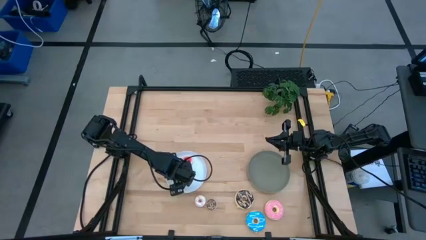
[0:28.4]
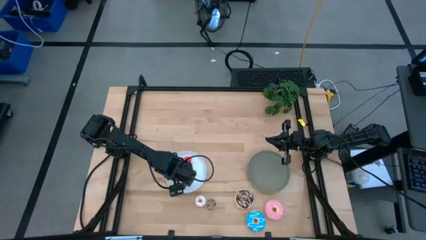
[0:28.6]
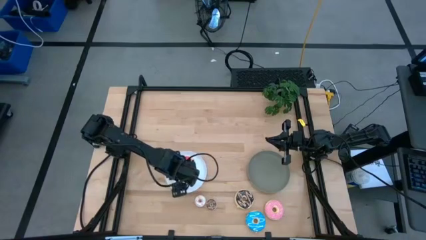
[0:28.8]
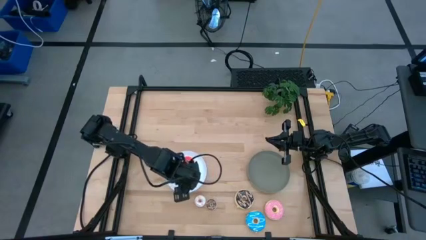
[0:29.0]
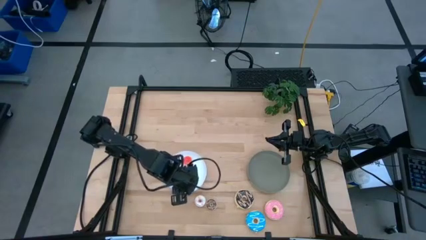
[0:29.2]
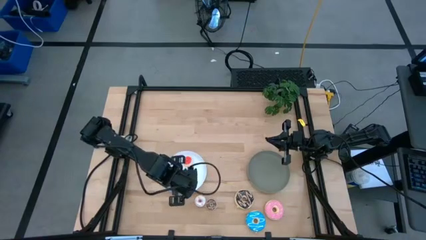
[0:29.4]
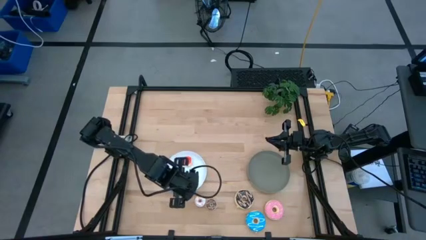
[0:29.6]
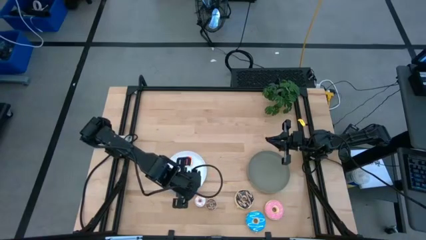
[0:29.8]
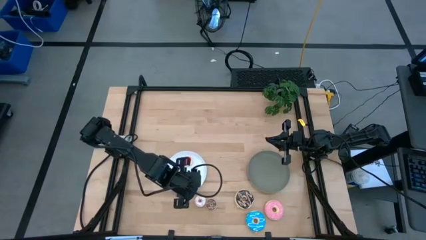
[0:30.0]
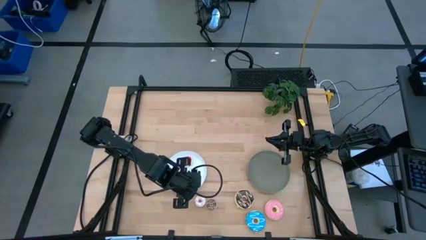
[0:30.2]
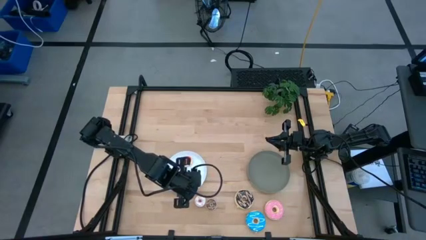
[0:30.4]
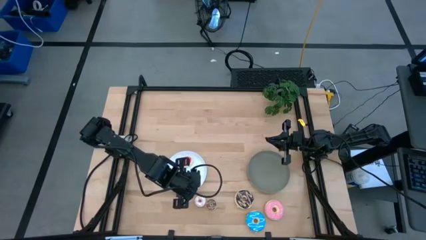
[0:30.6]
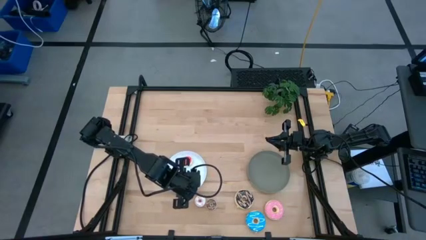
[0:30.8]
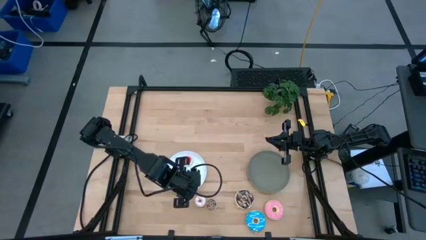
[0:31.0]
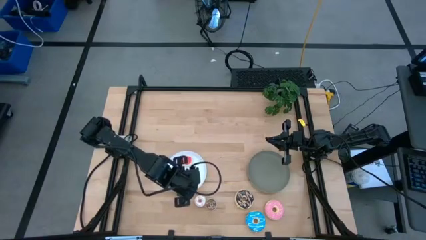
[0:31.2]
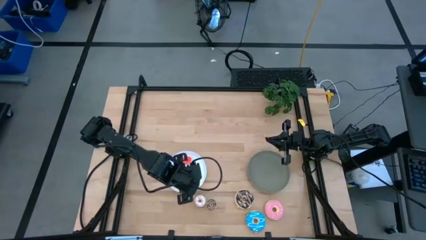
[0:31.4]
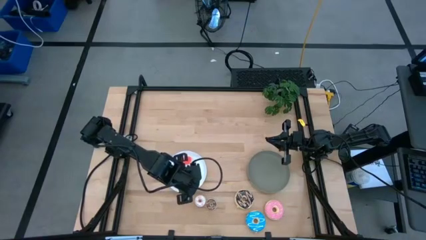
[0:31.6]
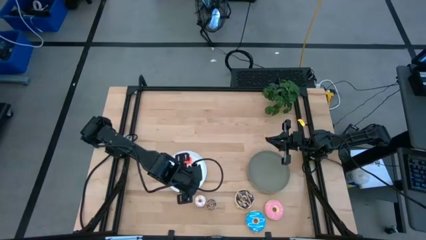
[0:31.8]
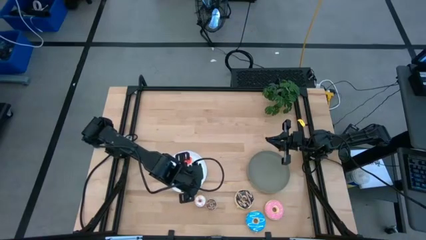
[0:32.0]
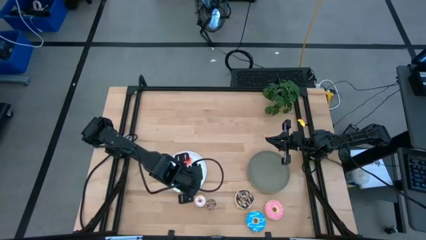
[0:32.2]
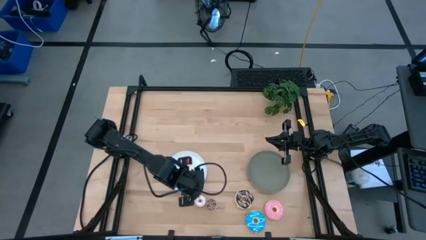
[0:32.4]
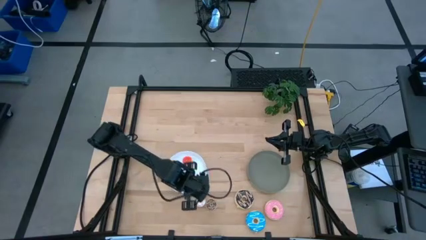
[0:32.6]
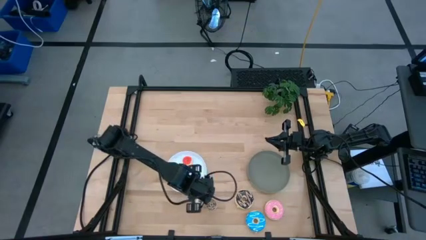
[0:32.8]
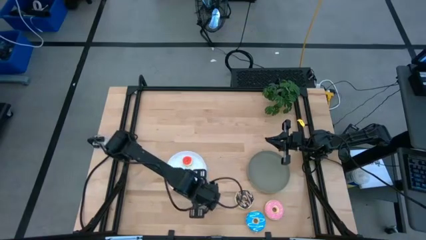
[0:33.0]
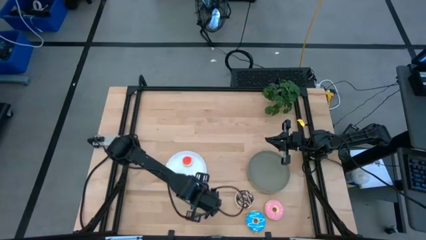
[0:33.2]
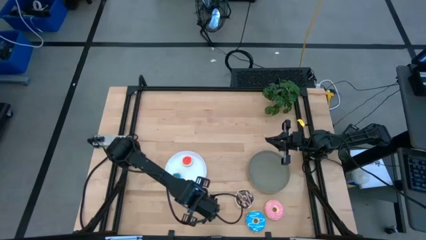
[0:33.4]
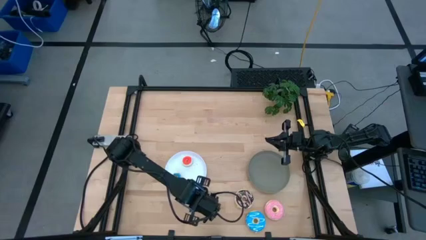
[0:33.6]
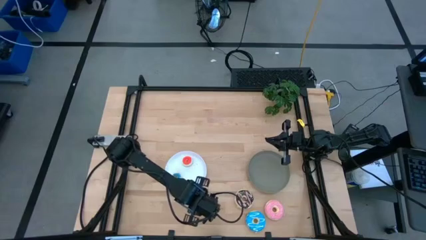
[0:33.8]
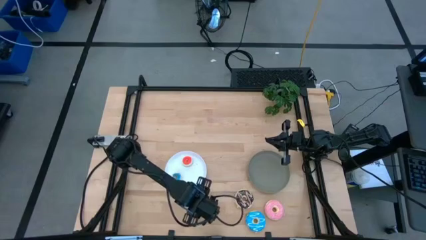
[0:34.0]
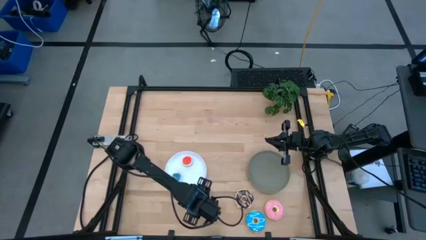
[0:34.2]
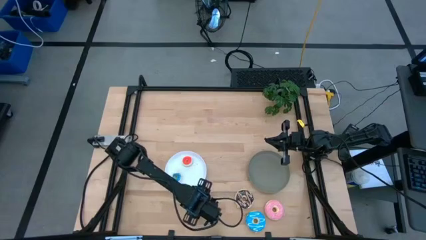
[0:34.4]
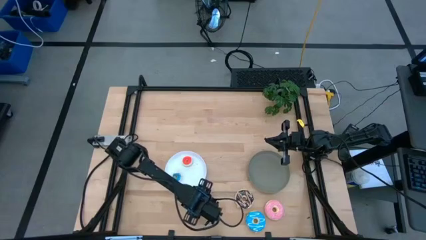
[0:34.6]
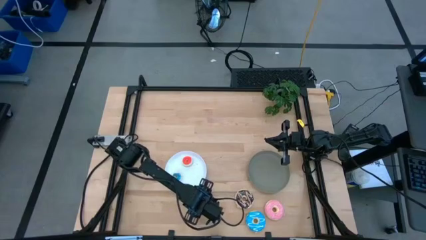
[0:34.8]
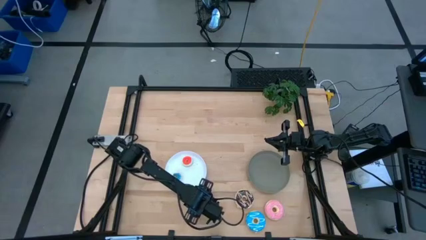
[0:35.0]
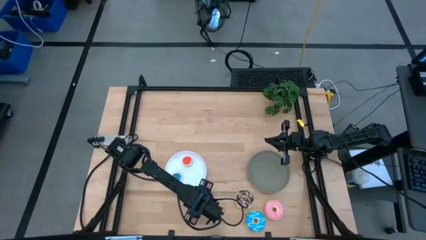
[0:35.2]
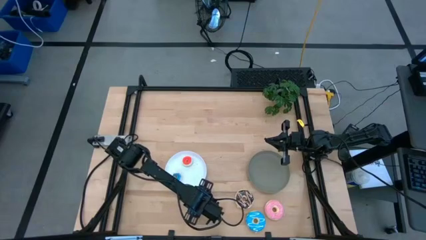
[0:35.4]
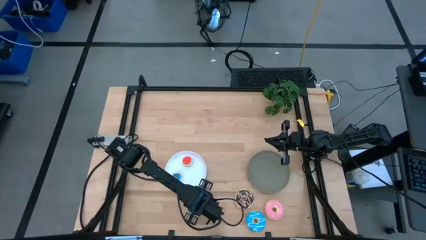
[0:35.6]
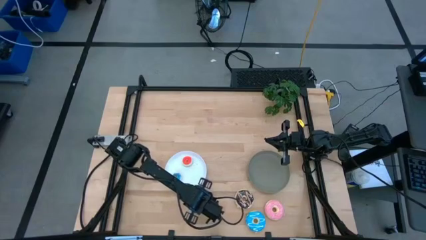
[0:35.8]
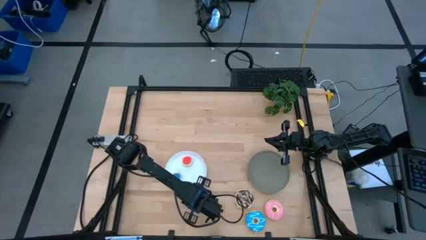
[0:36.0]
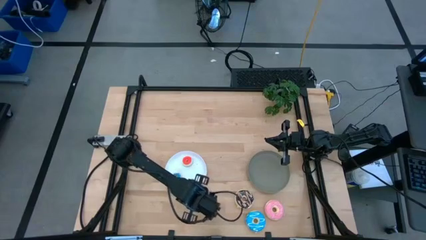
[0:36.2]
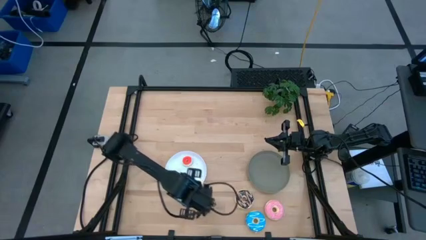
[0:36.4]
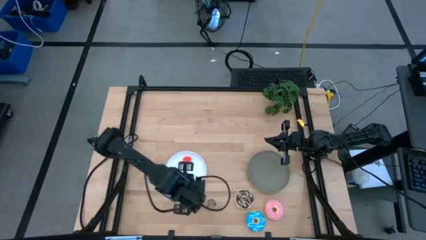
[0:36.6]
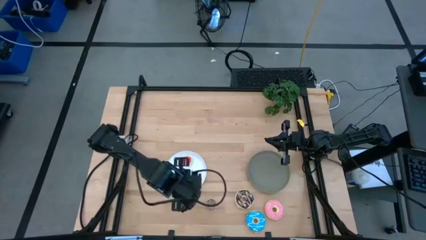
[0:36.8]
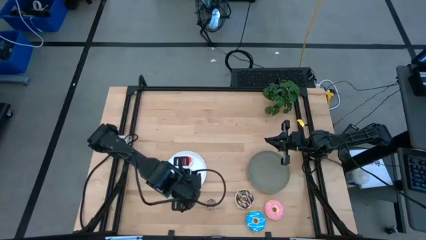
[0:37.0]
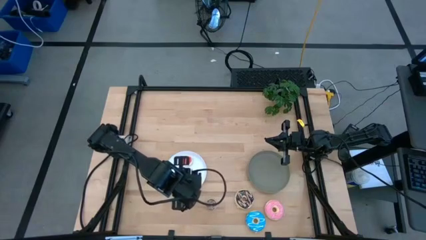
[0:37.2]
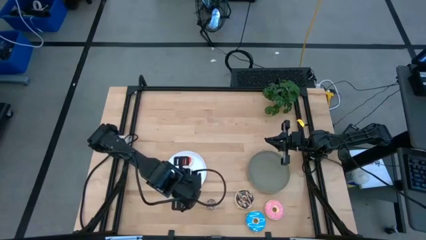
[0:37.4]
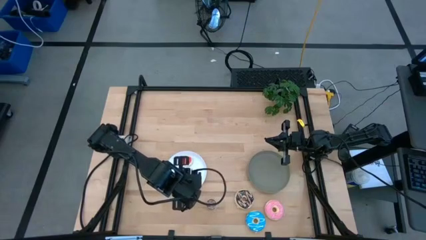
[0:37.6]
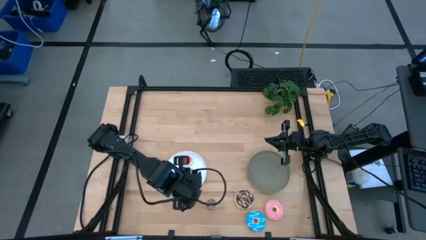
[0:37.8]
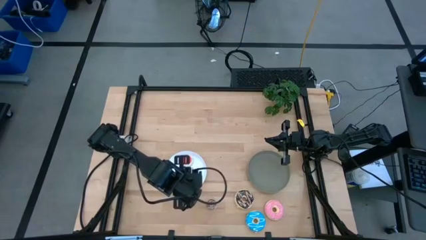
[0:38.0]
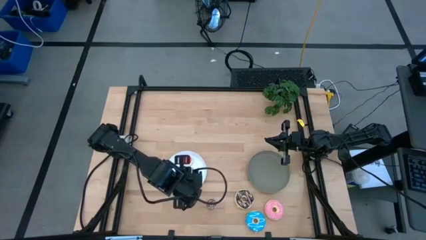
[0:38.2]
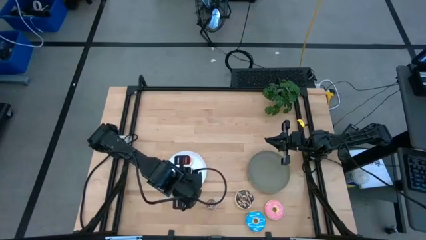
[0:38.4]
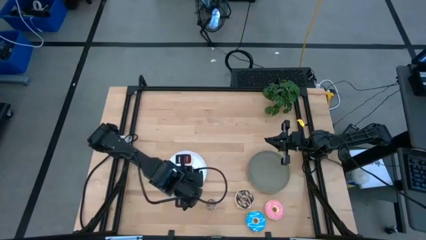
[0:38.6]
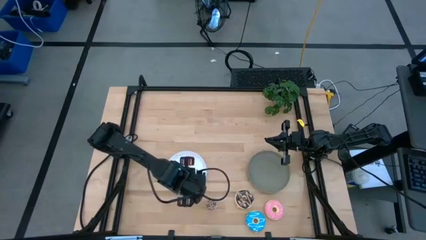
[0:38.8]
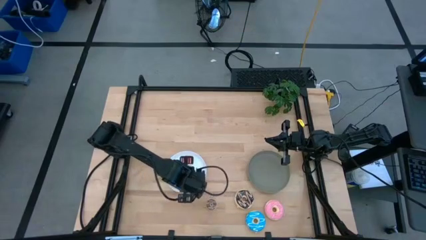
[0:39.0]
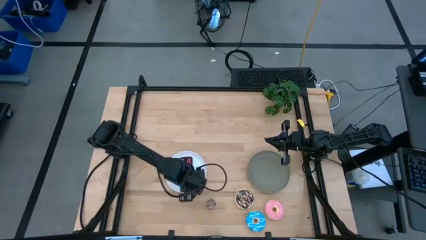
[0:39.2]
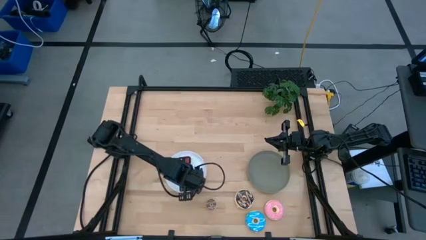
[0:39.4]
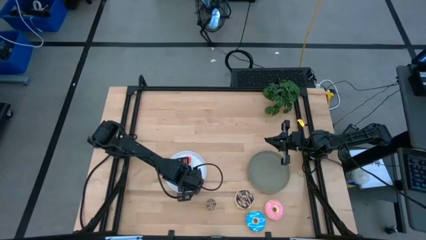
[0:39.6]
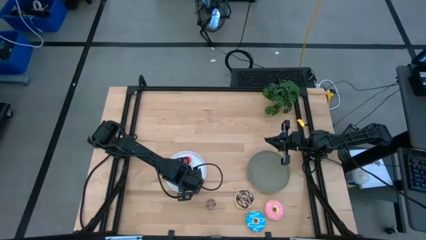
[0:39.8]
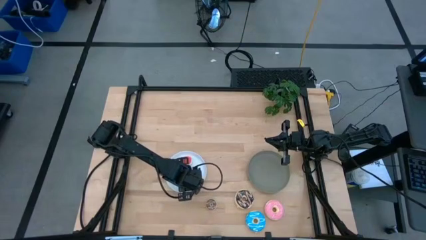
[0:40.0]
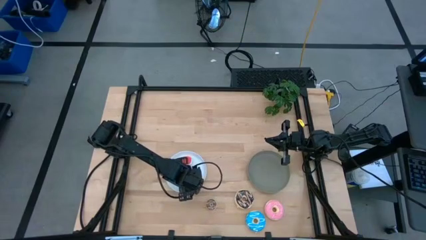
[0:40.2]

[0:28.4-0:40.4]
Task: Pick & Place donuts
Put the small white donut on the white plate

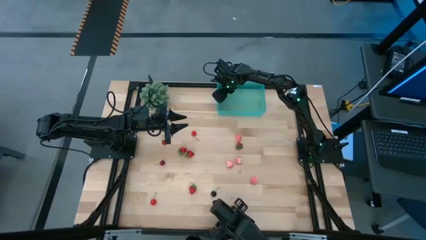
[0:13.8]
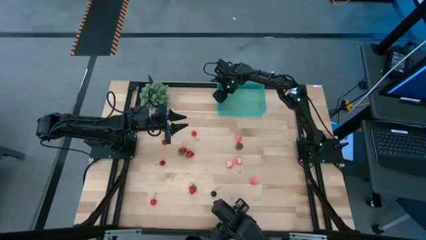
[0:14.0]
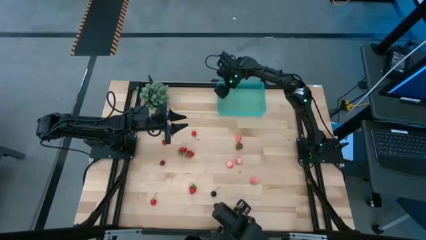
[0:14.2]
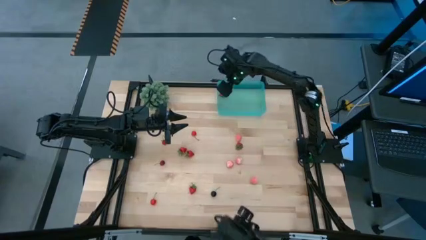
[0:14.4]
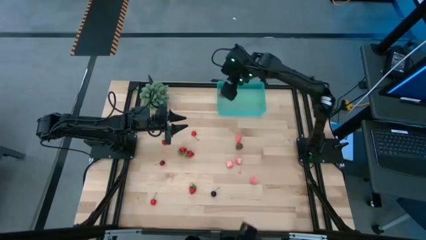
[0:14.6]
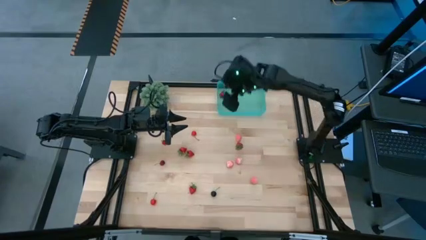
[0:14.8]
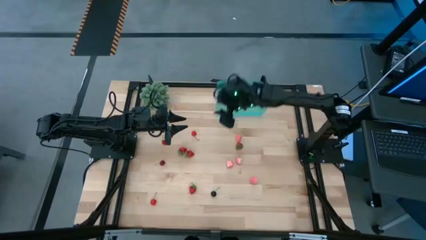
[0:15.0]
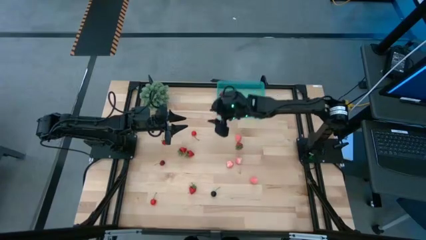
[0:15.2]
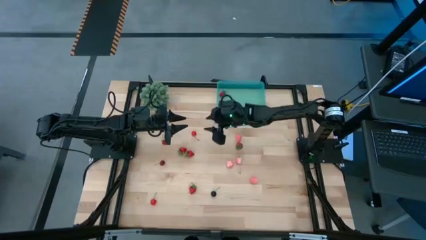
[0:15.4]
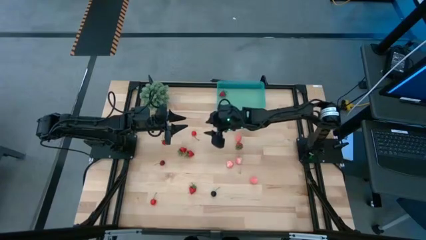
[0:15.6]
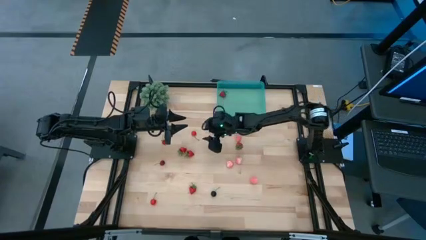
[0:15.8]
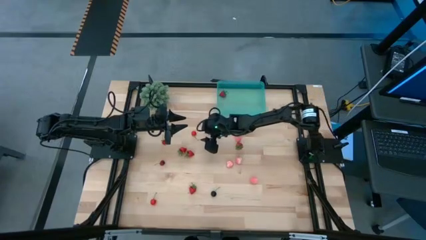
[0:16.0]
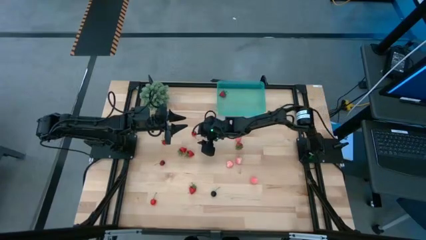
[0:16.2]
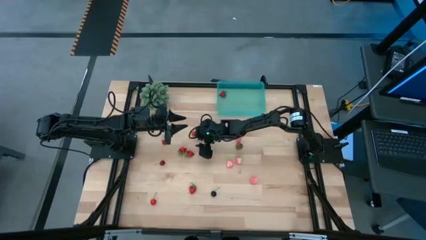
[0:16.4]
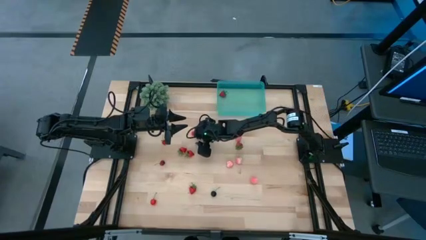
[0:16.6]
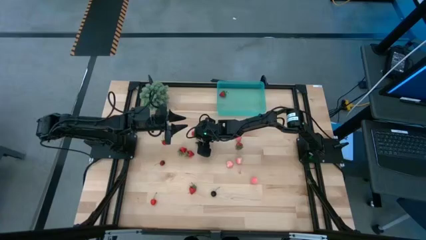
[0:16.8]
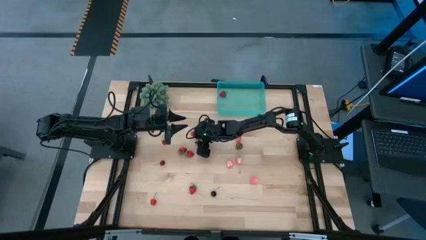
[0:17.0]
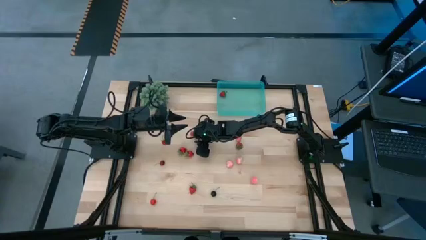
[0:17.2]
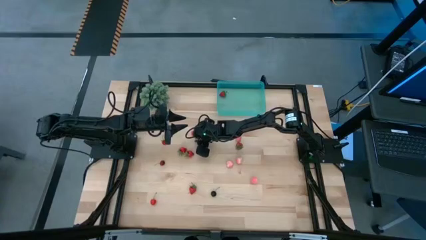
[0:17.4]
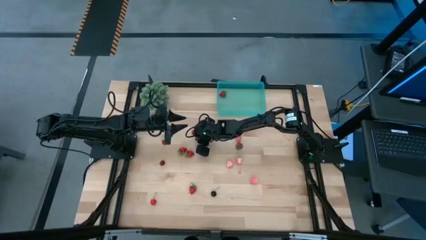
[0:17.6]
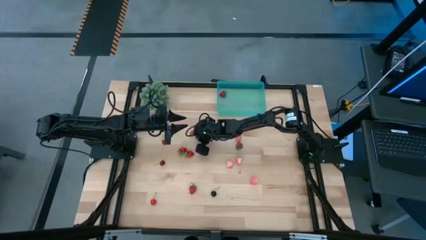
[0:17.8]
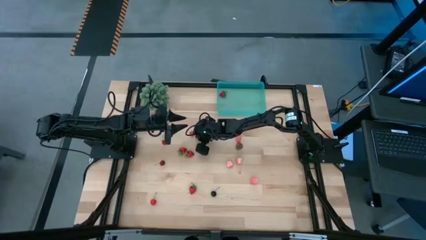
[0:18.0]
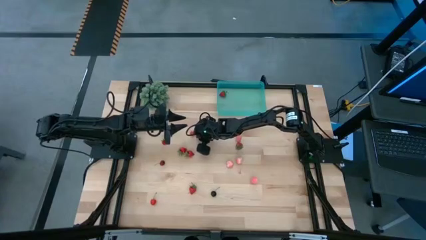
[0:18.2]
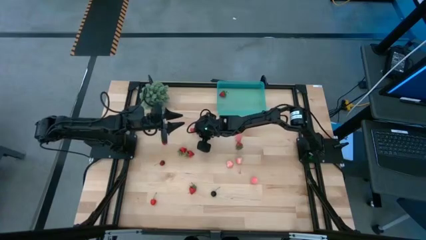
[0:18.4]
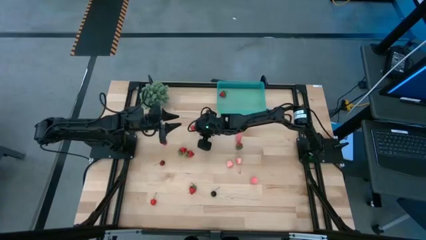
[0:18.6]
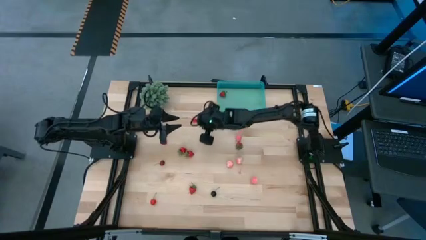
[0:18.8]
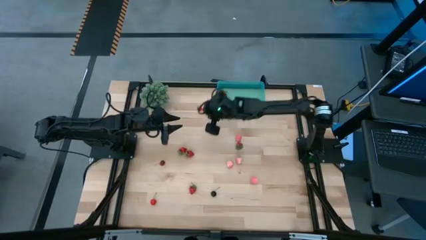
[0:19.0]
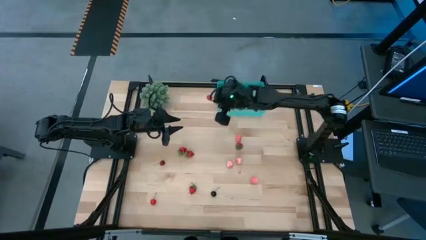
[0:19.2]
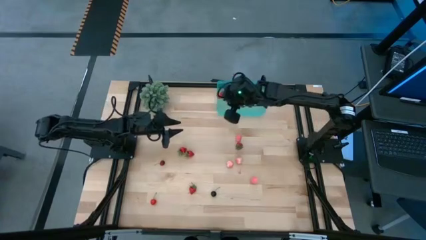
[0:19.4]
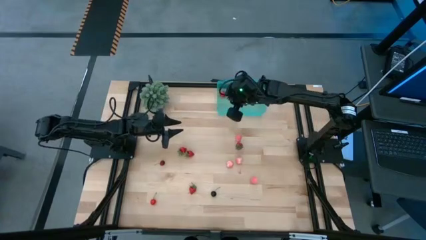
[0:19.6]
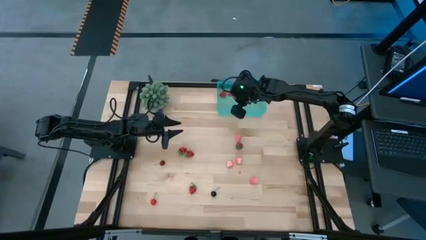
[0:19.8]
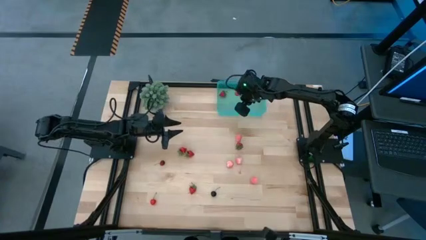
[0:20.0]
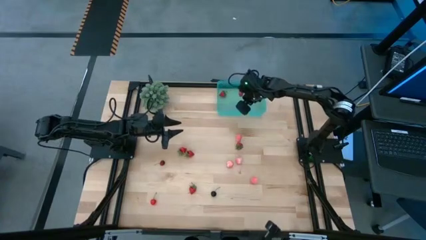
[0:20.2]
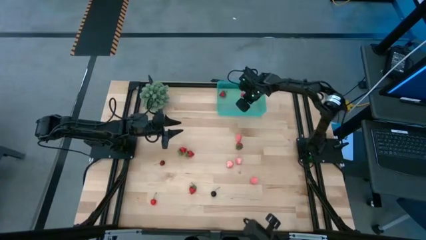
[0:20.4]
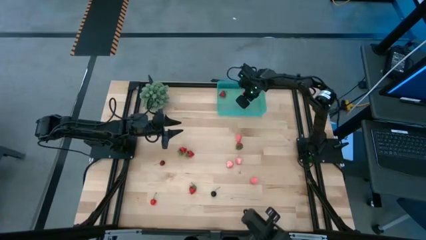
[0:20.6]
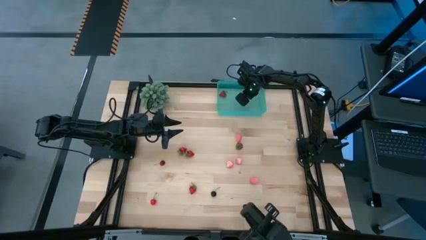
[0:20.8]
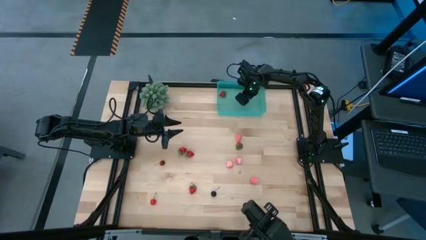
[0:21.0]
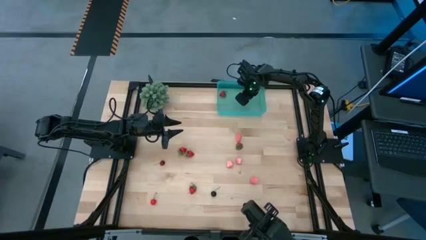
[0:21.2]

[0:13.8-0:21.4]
Task: Pick and placing Produce into tupperware
Put the cherry into the blue bin
